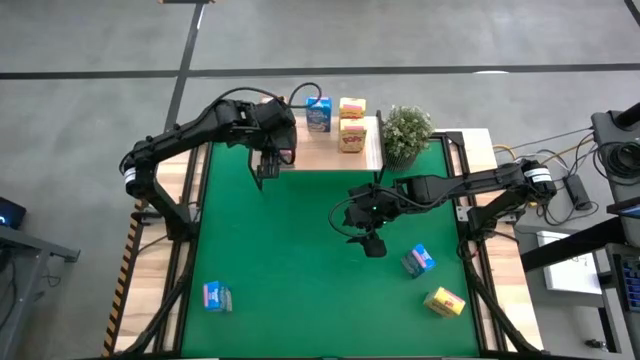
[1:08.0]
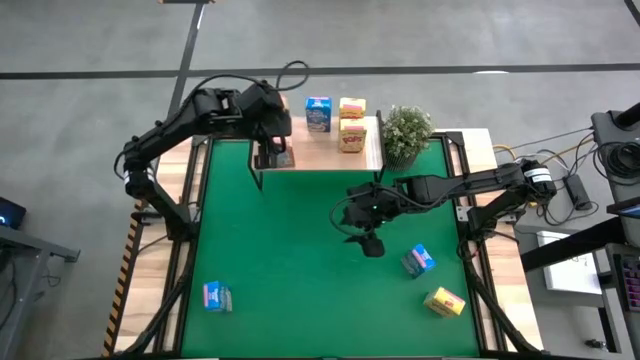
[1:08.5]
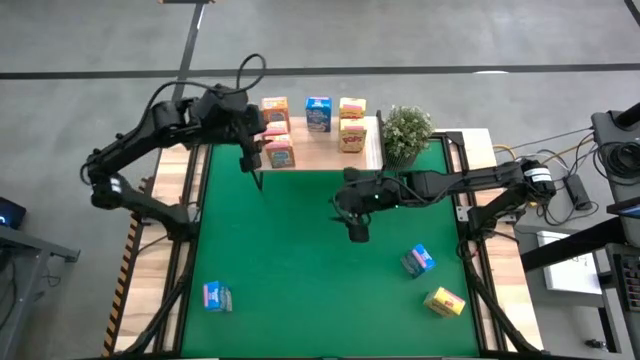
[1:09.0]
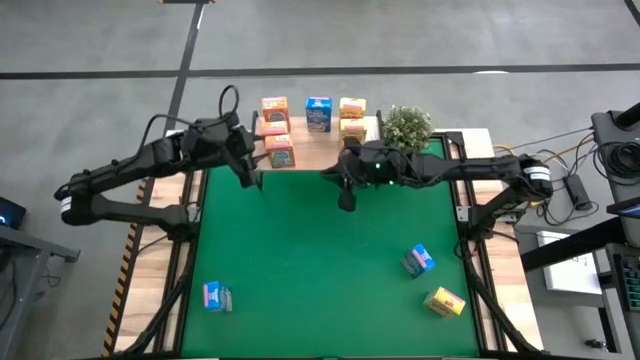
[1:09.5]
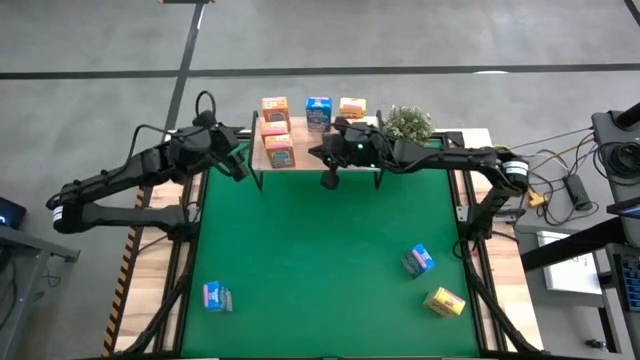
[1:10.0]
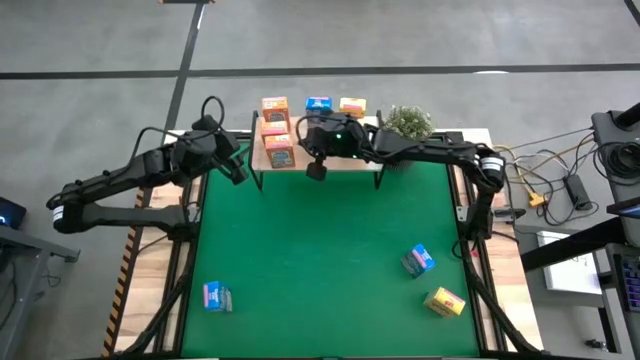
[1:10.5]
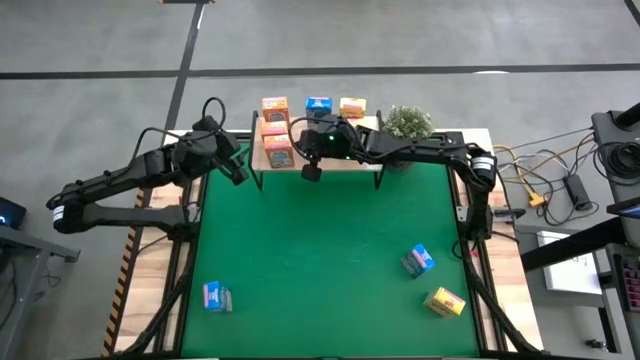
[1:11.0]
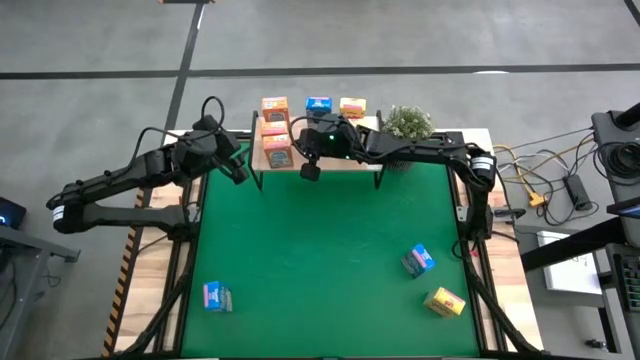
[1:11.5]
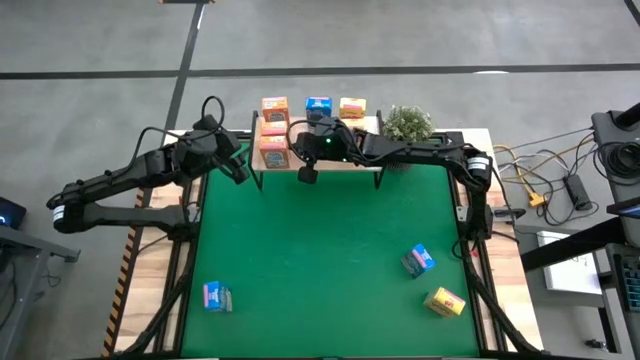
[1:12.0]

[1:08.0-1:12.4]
Task: Stack cereal on shelf
Adjust the front orange cereal box on the shelf

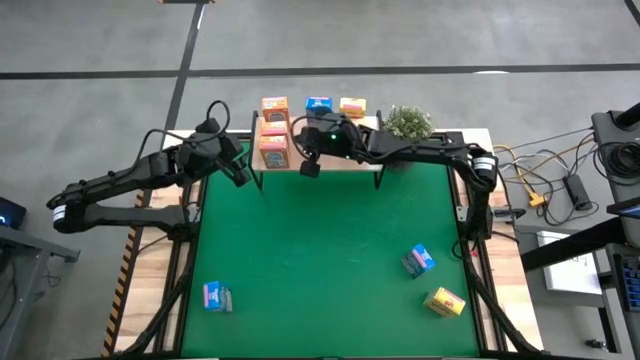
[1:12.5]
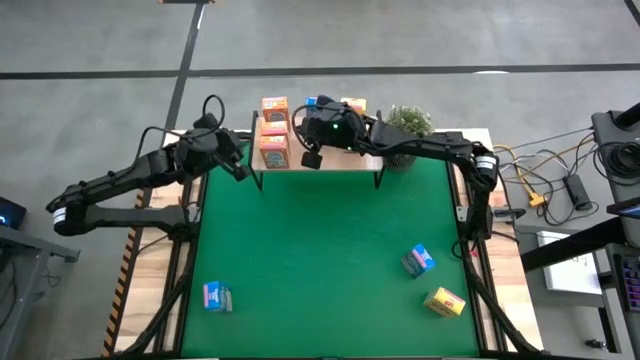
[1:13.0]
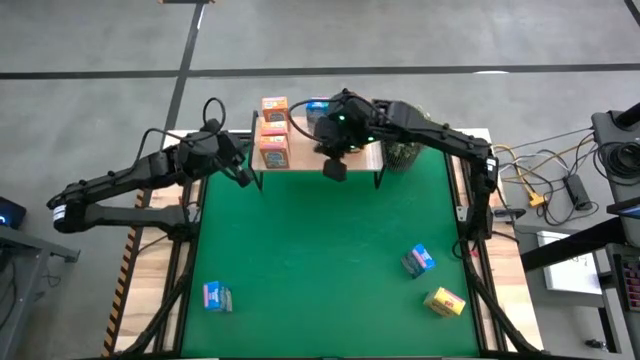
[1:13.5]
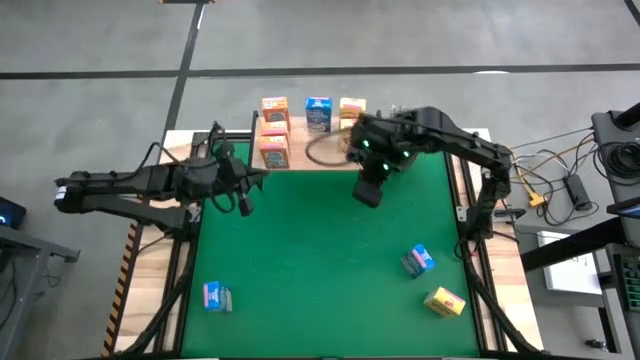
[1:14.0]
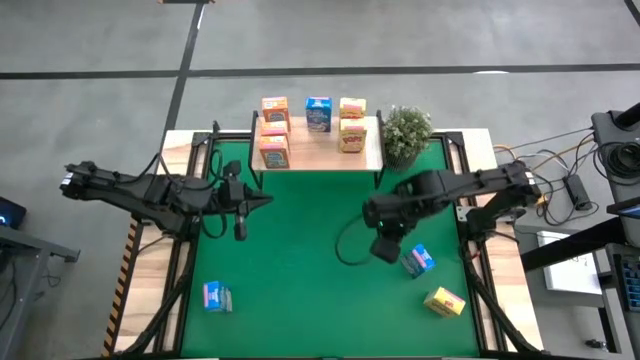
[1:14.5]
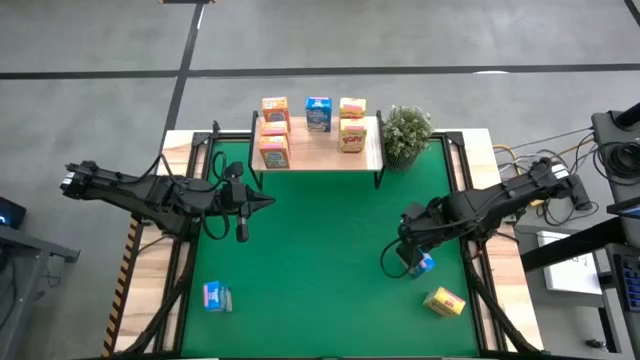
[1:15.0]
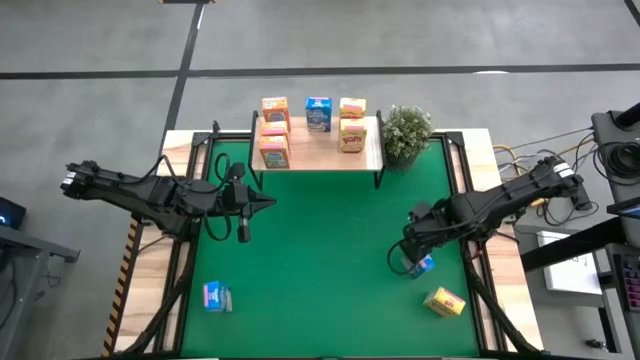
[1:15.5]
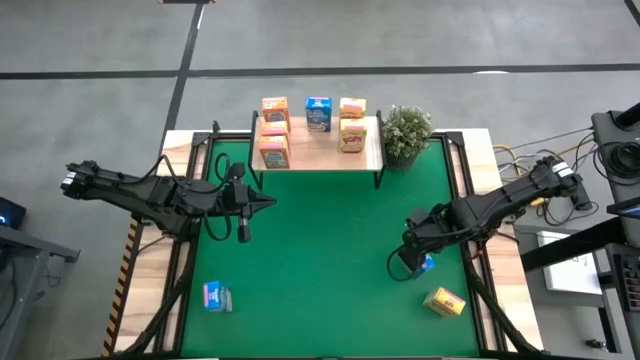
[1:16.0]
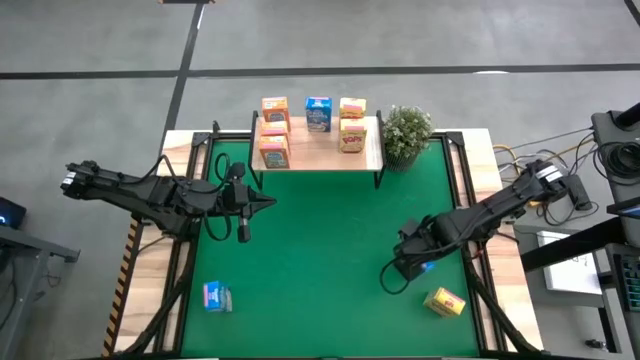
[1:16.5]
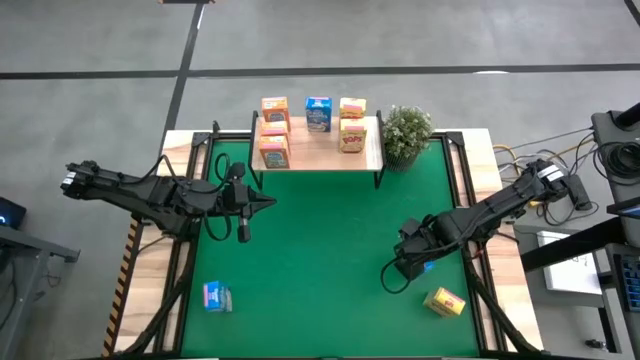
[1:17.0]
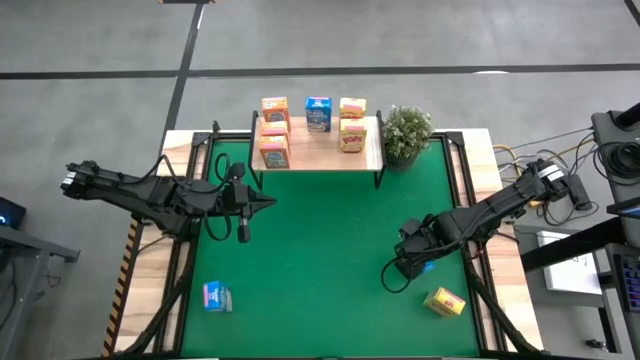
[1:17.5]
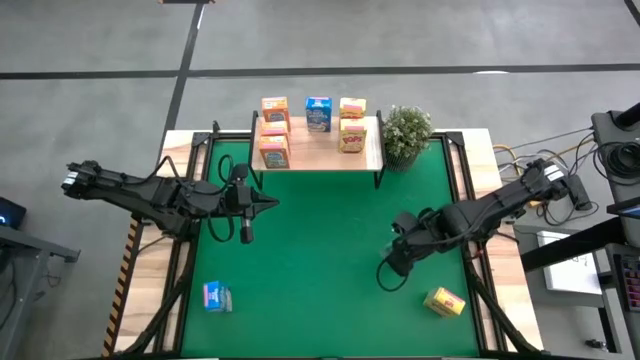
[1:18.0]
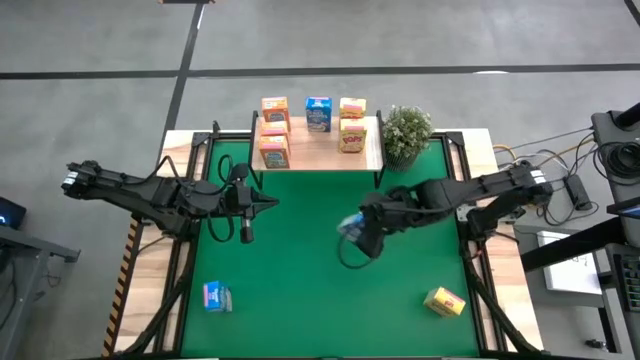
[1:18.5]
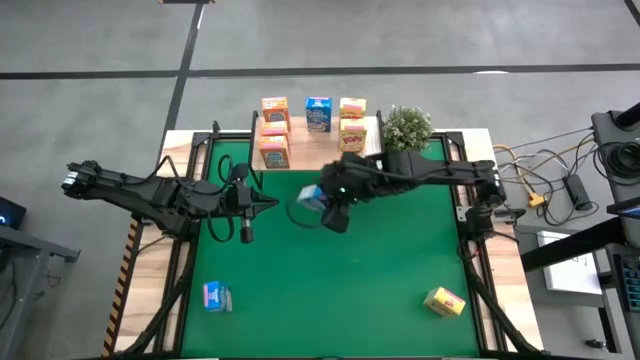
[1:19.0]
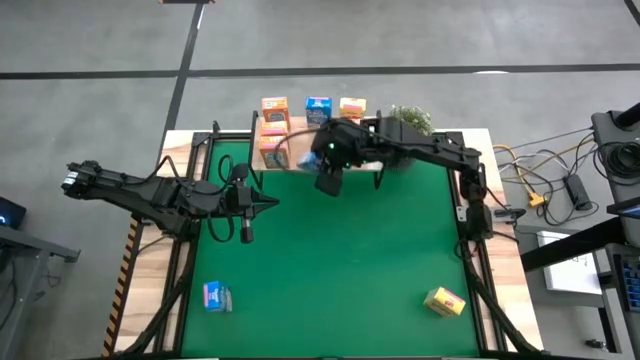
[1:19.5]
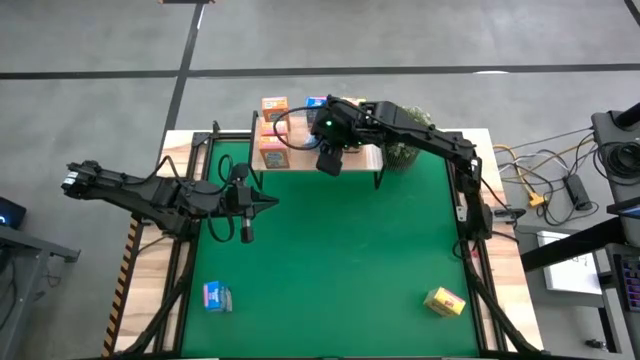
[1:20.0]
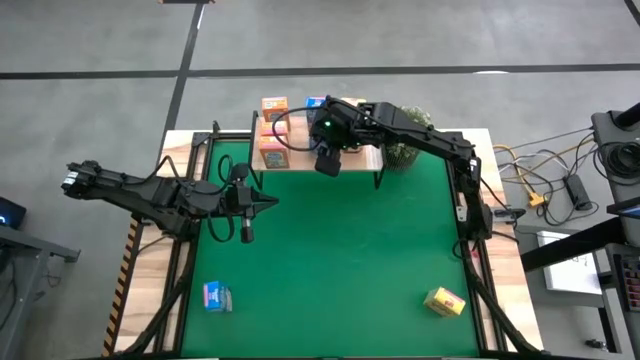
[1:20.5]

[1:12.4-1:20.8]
Put the right blue cereal box on the shelf

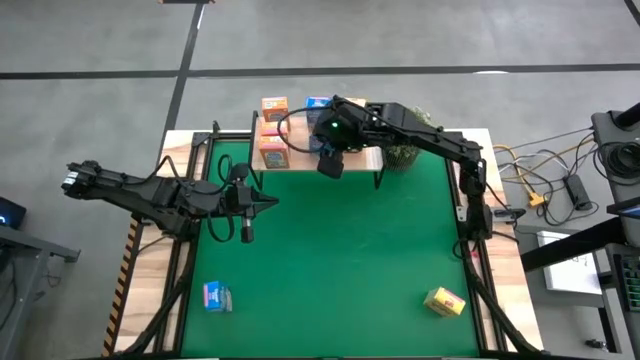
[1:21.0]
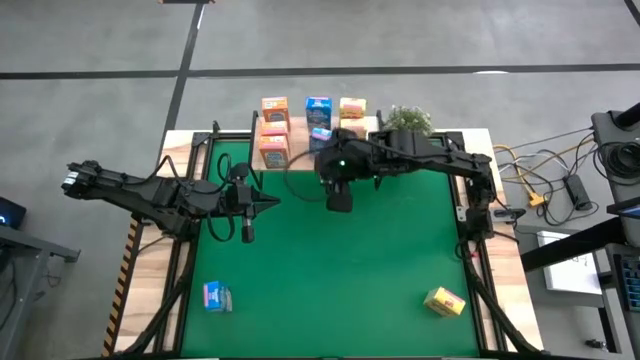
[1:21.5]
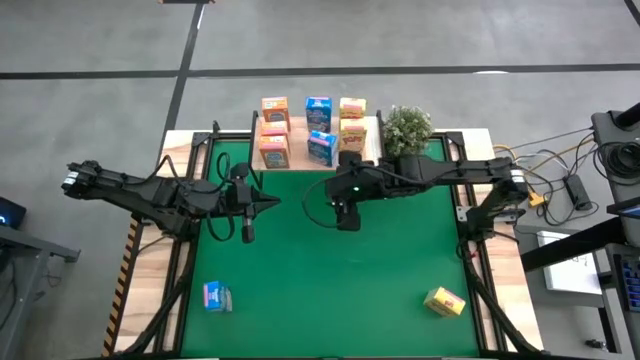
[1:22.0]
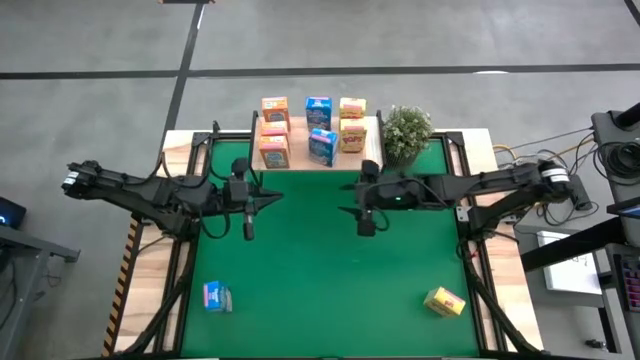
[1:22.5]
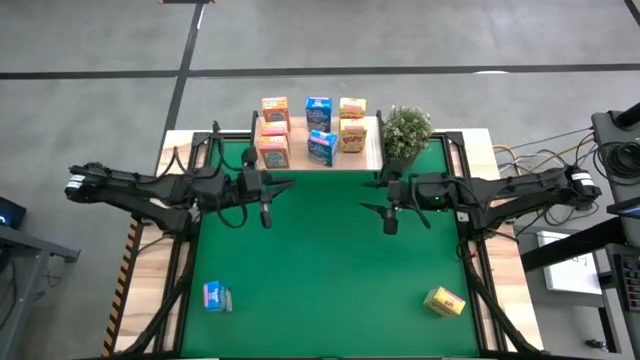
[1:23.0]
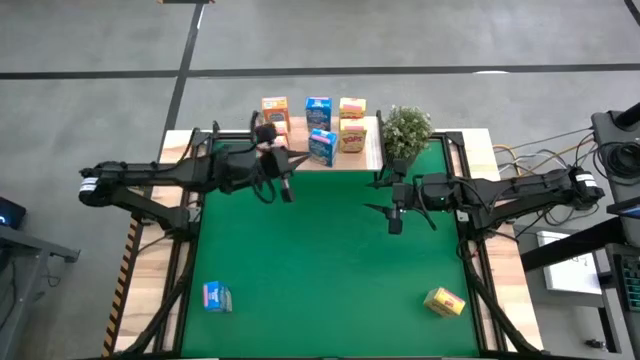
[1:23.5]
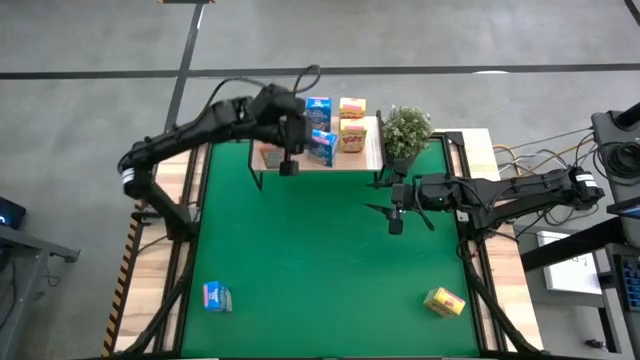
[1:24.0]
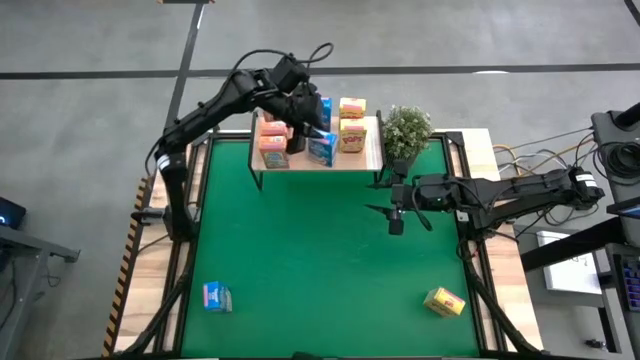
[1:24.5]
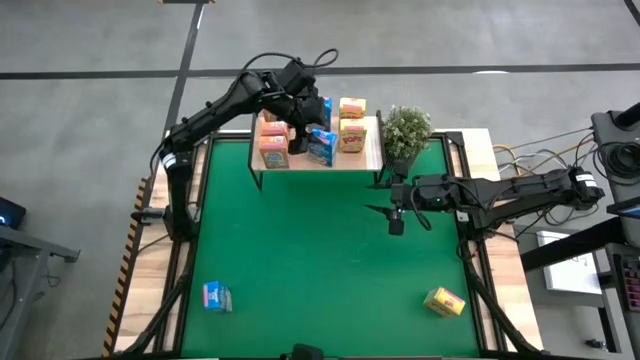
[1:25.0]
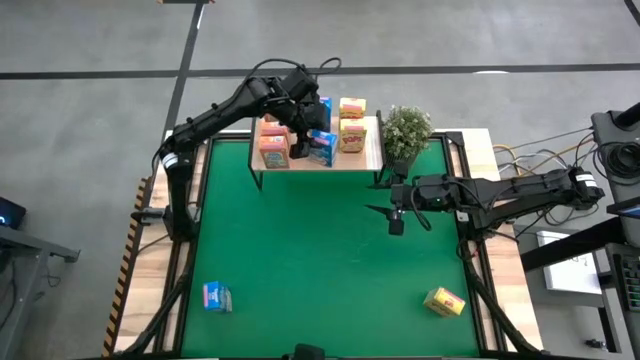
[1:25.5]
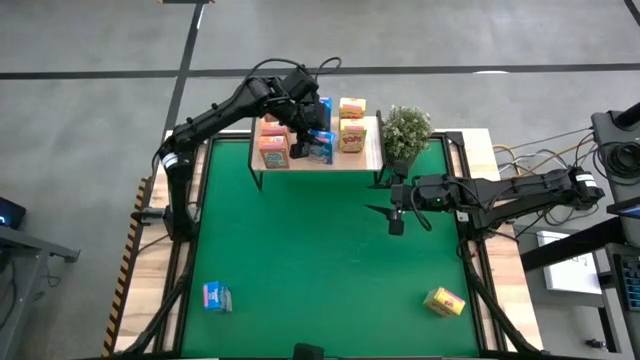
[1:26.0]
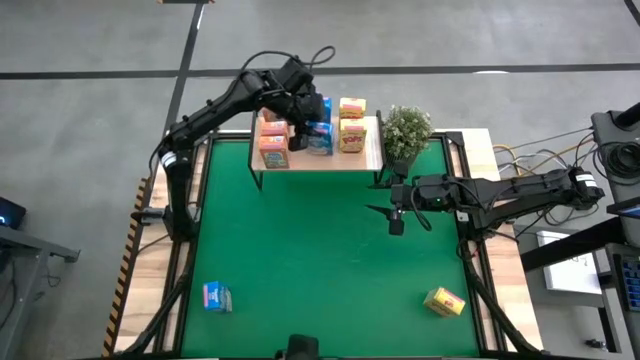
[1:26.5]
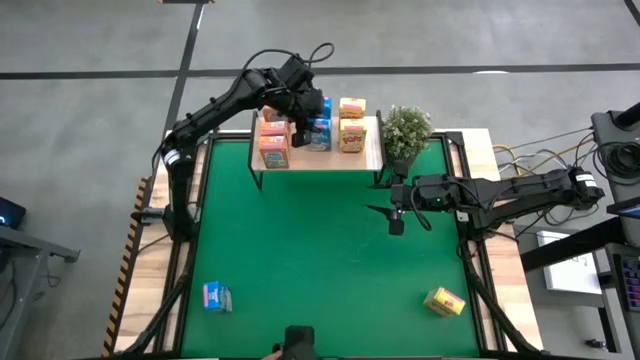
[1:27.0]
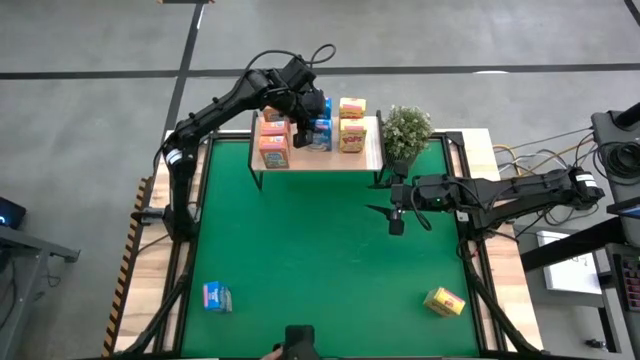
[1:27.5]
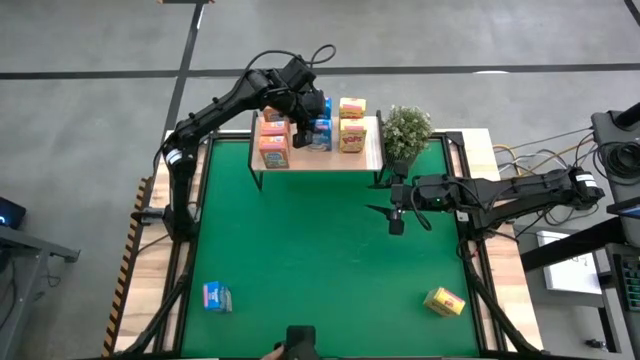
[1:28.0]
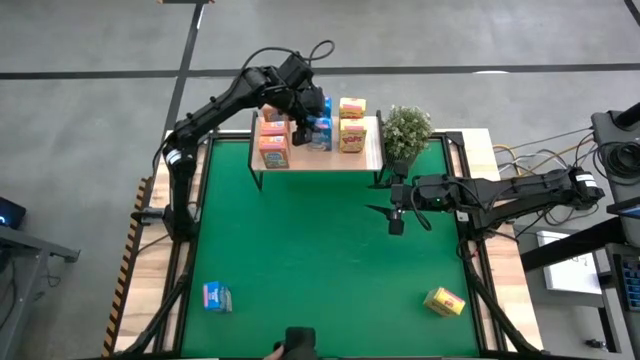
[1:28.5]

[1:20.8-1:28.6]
Adjust the front blue cereal box on the shelf

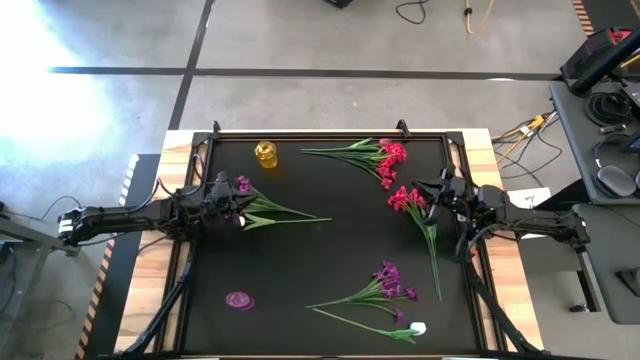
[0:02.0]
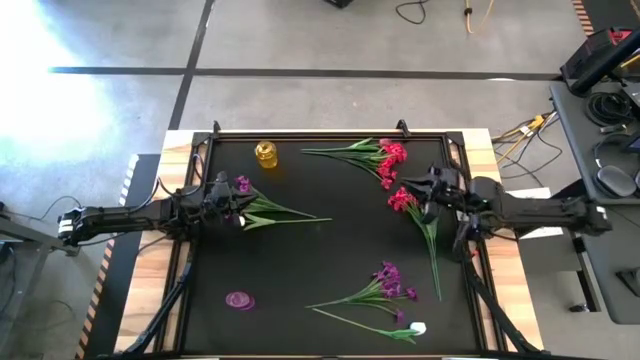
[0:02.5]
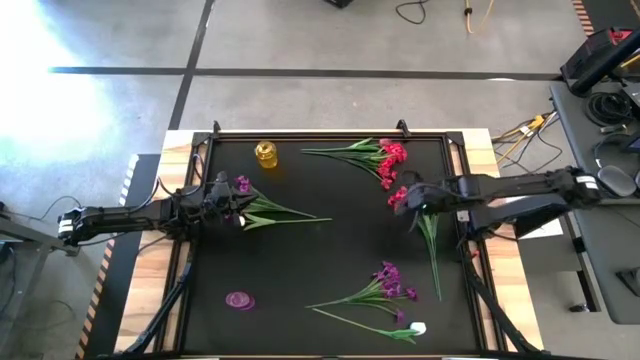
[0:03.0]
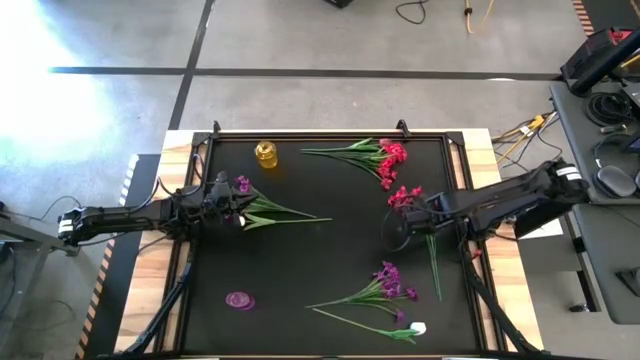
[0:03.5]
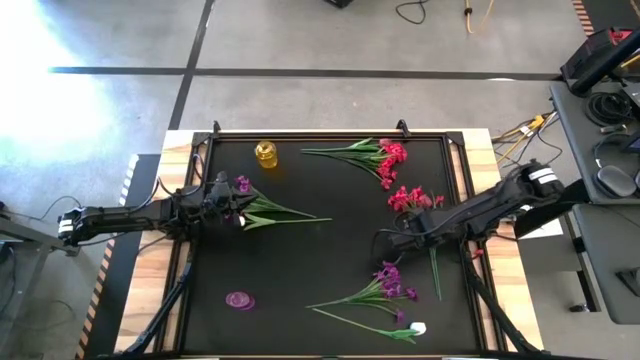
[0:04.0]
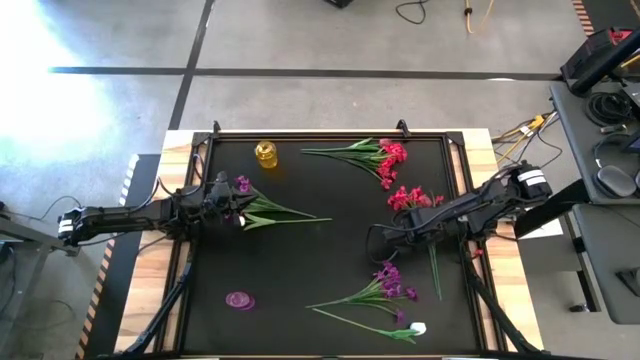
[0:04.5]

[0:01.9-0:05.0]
Task: Sort flowers into vase by color
Put the right red flowers into the yellow vase
